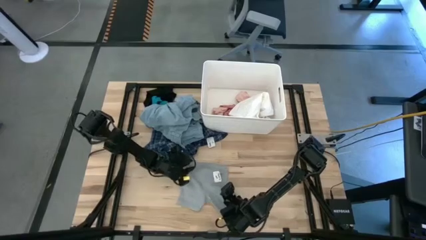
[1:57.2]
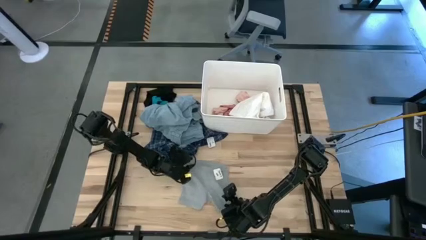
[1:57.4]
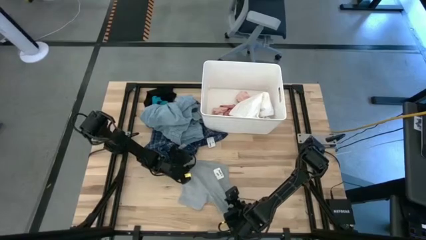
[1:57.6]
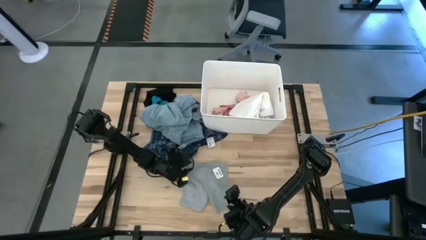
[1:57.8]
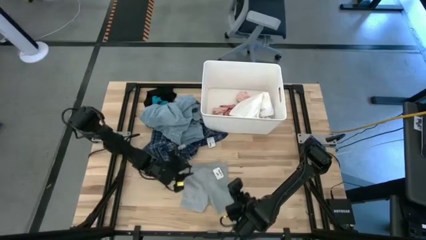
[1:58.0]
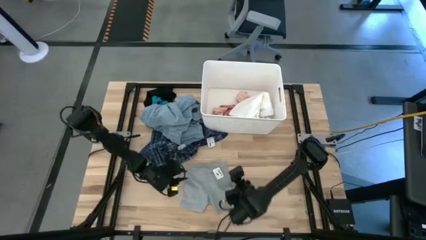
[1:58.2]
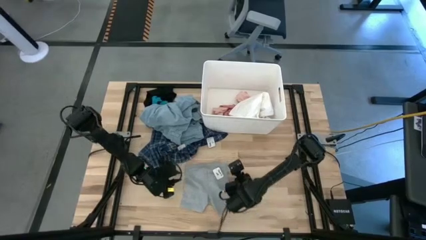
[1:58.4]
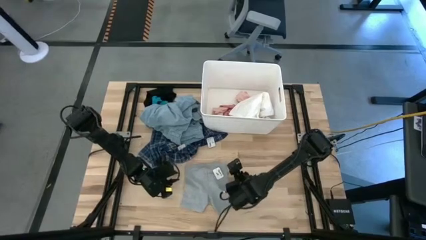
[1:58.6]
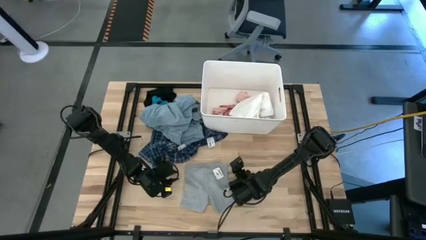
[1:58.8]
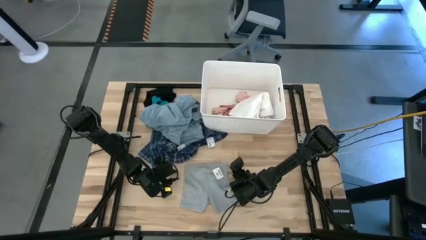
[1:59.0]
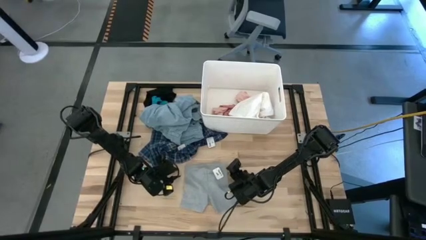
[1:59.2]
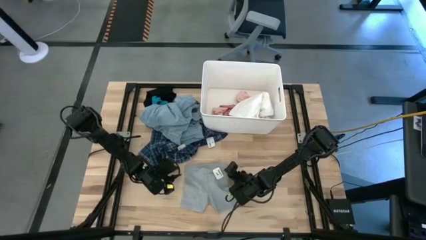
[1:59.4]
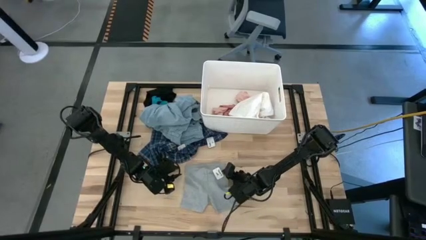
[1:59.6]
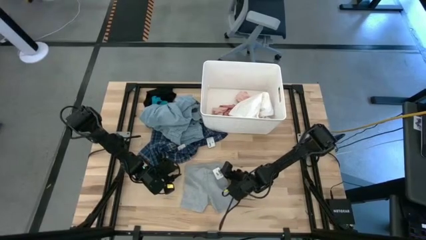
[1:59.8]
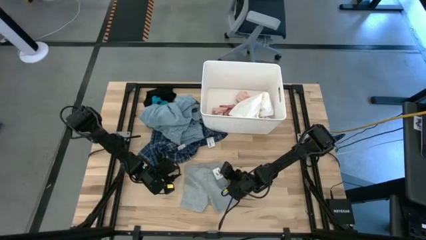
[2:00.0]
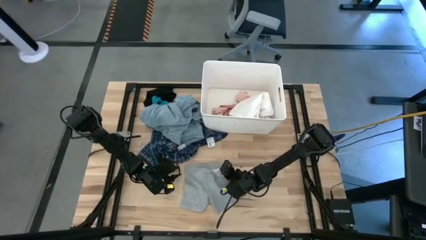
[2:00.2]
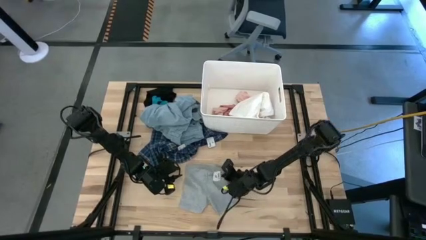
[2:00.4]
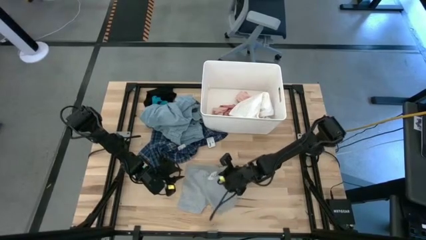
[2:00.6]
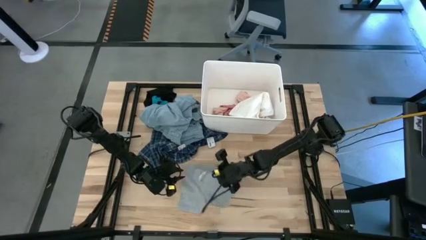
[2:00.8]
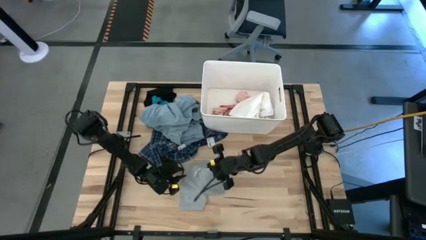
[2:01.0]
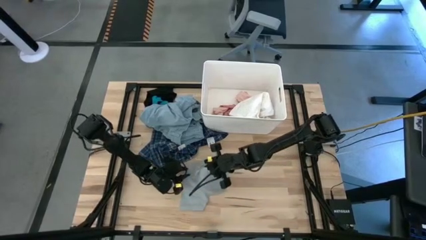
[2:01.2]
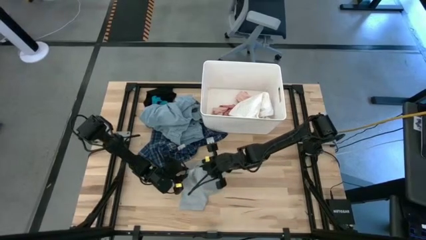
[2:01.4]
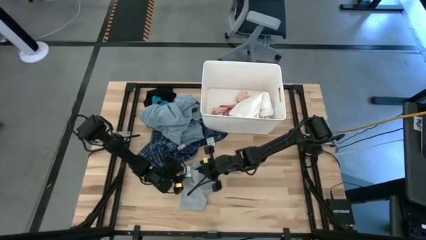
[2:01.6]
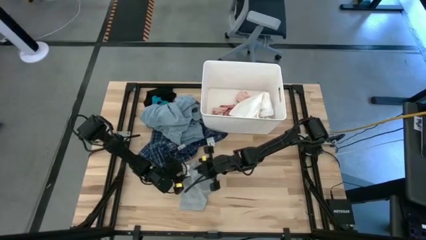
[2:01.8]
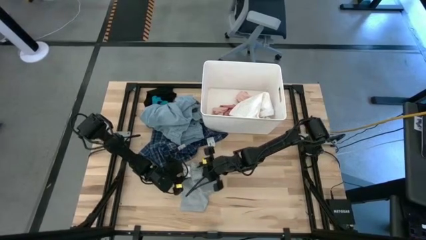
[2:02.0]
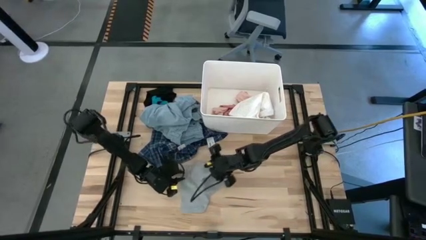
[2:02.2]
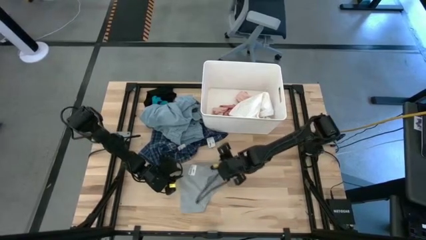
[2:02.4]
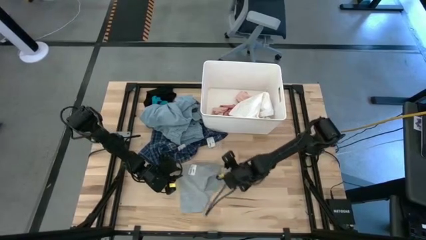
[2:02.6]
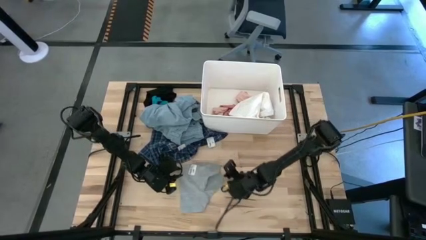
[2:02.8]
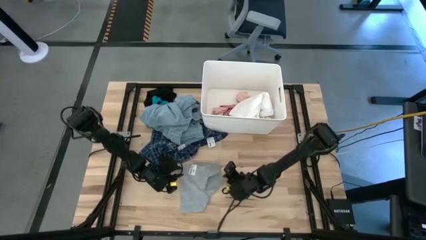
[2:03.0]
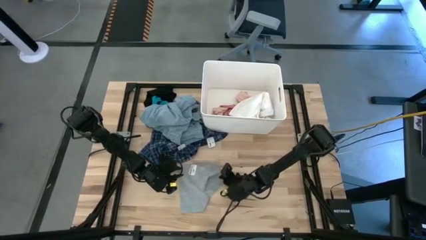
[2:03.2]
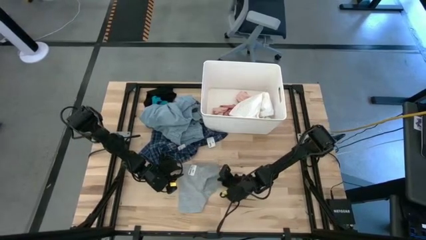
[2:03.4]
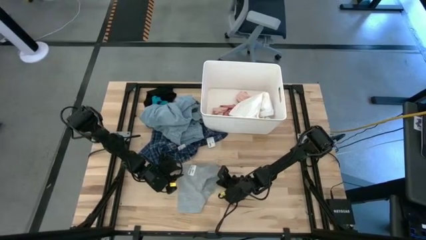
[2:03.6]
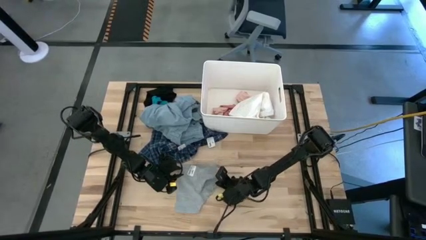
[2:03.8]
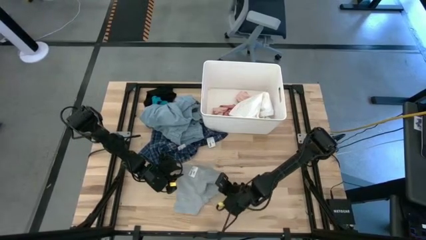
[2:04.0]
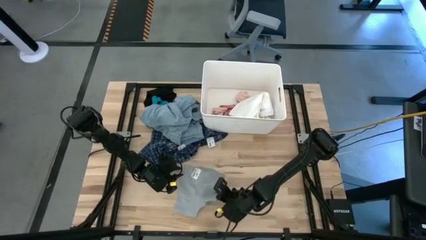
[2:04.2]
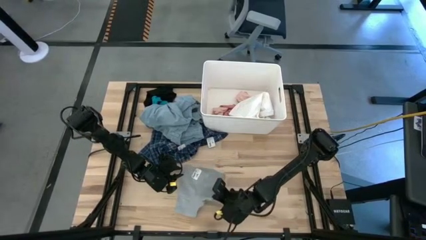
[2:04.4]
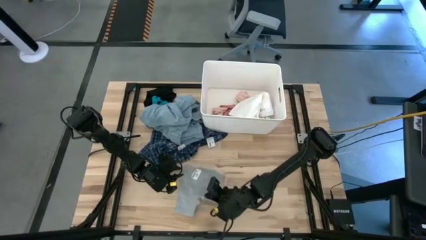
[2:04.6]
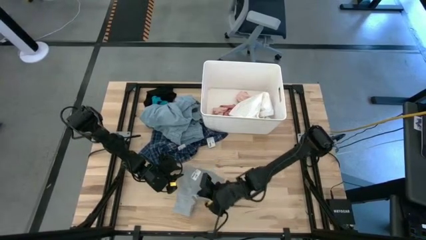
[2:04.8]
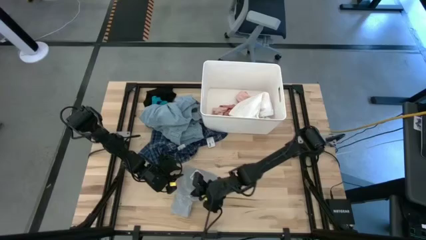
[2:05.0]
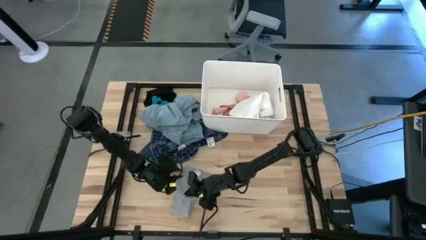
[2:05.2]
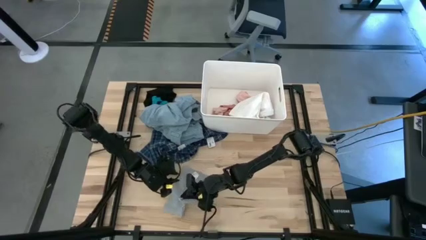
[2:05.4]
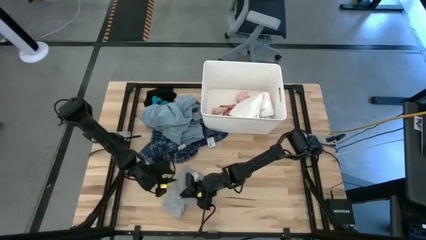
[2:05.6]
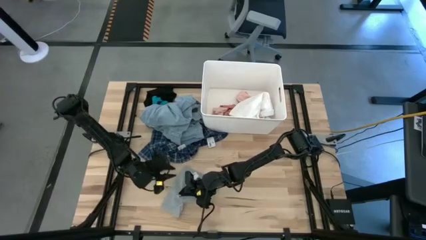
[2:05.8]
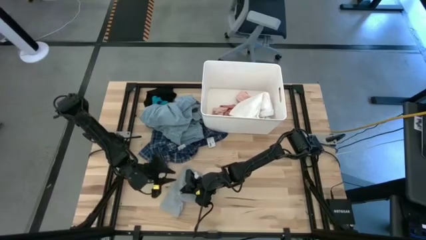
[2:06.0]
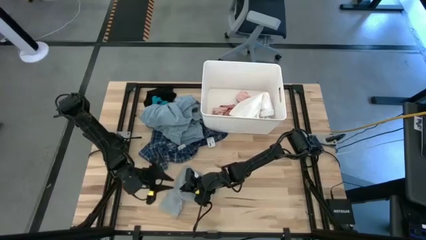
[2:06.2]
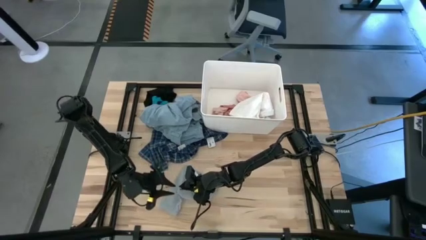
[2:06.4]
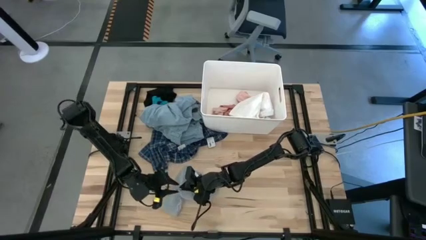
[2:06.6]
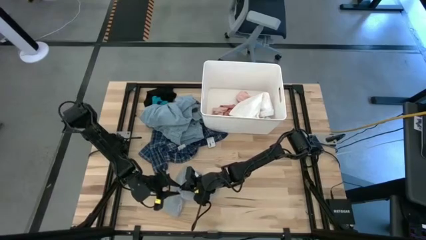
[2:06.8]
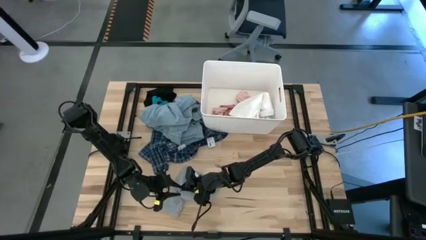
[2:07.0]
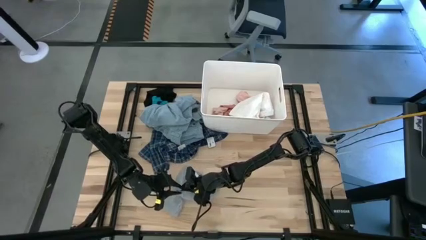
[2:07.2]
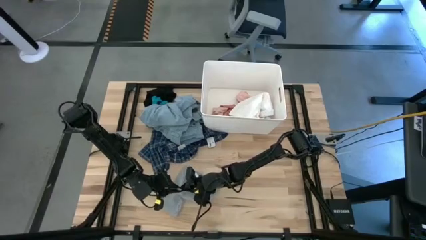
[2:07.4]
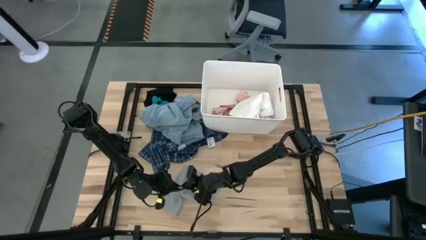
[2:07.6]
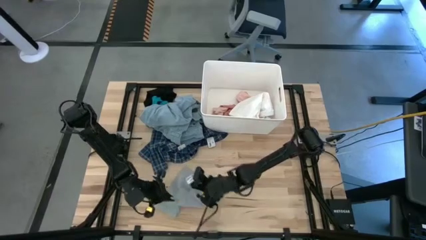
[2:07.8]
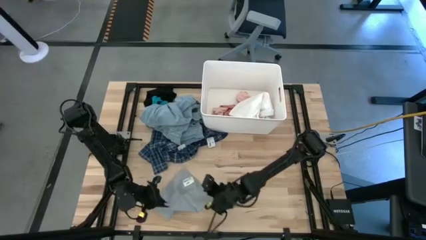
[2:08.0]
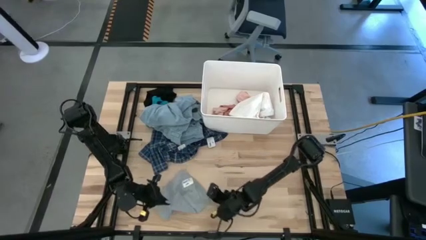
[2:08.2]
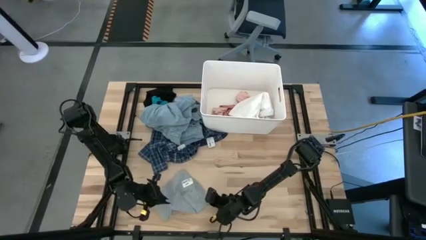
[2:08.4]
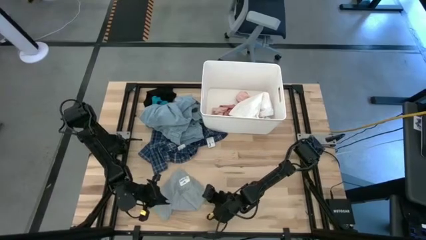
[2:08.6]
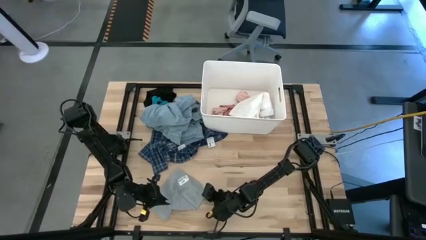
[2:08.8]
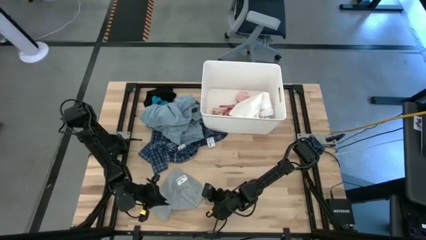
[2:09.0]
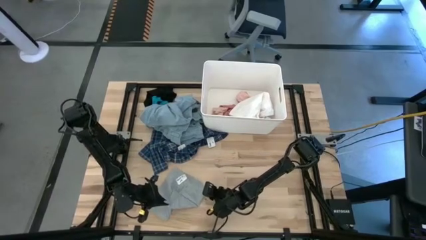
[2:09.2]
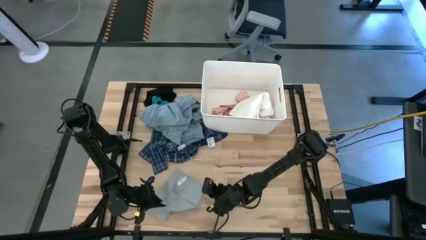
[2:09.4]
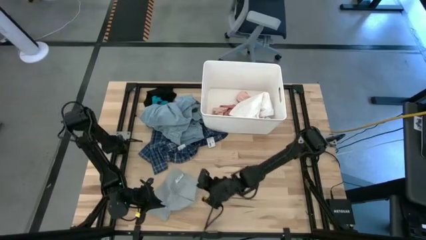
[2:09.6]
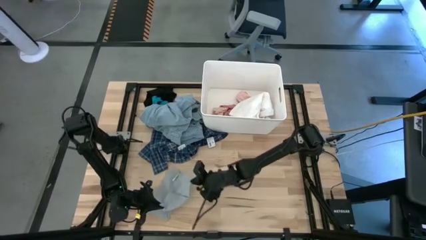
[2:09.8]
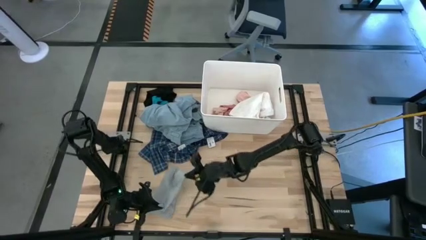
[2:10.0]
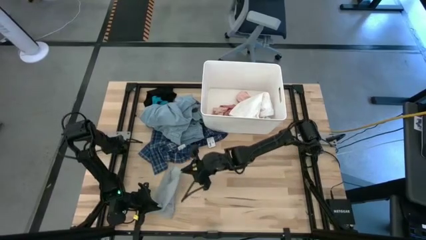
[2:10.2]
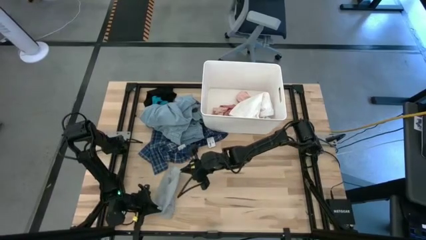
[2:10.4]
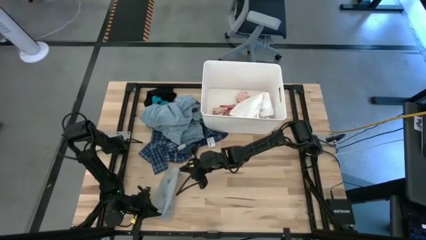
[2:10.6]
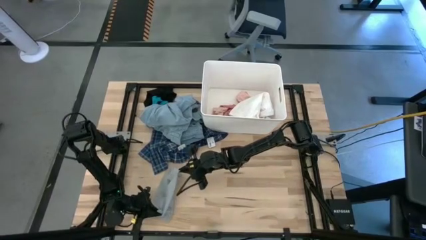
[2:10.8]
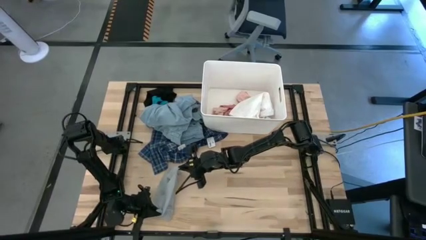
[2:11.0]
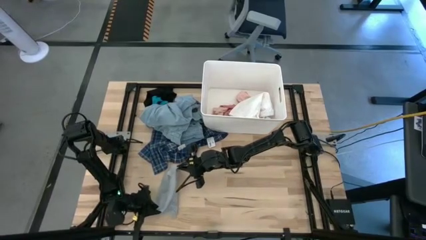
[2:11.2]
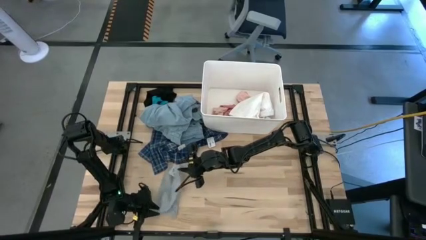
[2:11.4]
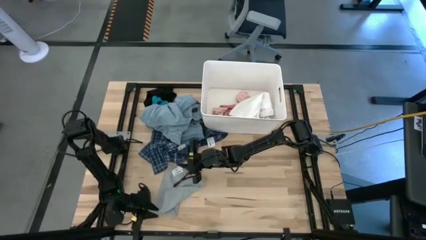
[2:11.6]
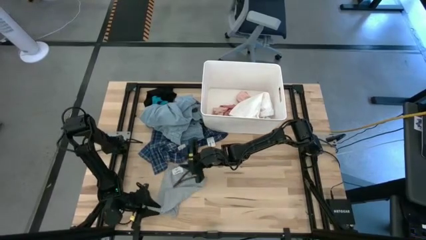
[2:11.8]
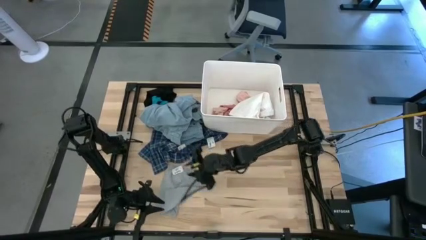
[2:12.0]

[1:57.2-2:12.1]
Task: Sort clothes
Put the gray boxer into the white laundry bin
